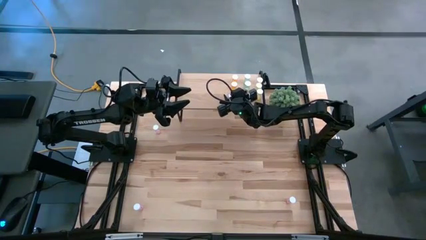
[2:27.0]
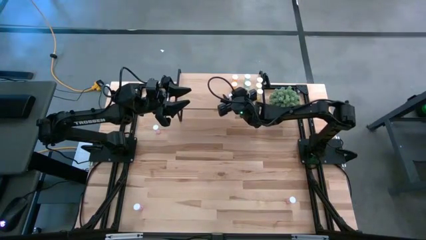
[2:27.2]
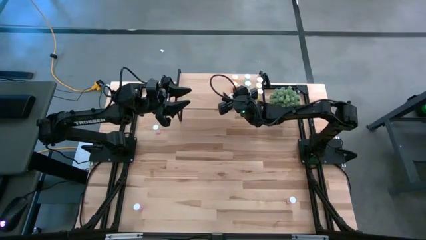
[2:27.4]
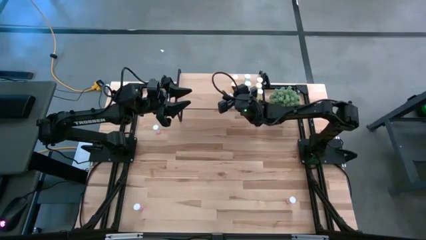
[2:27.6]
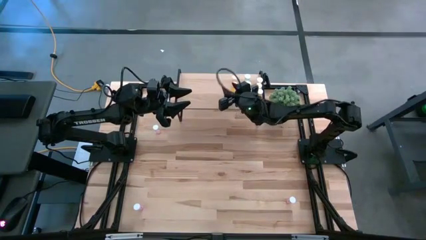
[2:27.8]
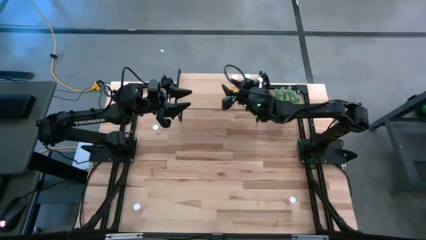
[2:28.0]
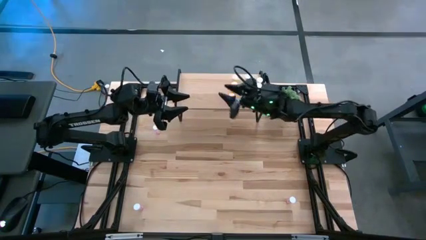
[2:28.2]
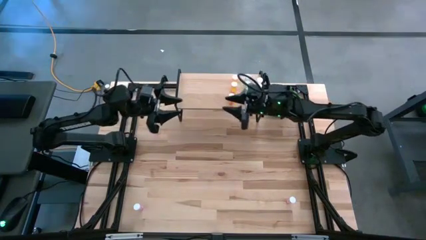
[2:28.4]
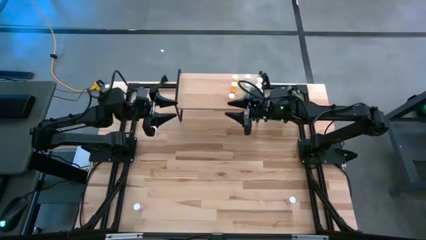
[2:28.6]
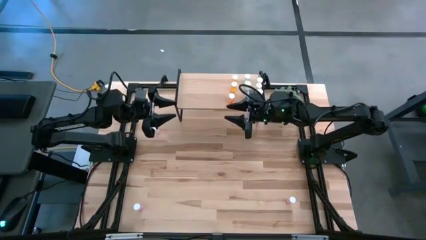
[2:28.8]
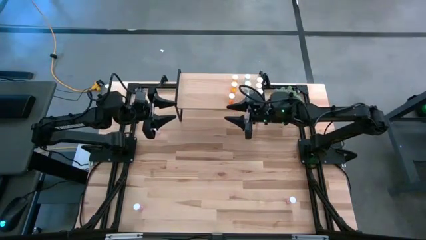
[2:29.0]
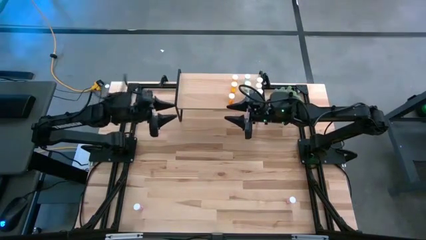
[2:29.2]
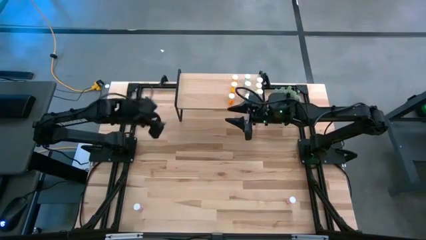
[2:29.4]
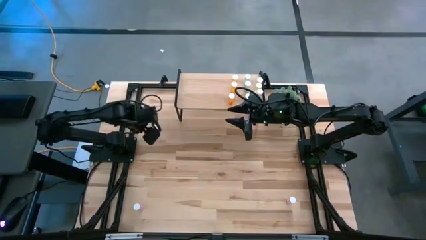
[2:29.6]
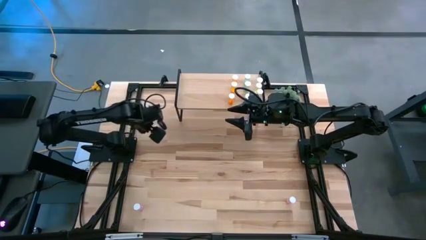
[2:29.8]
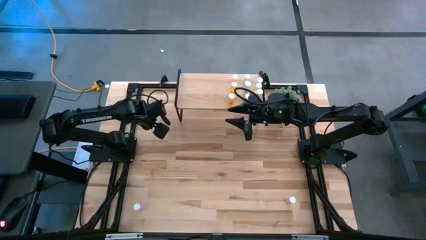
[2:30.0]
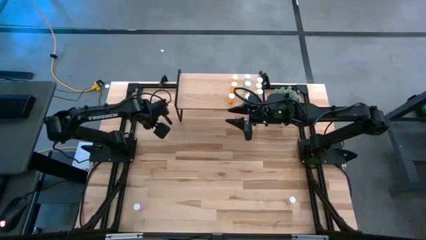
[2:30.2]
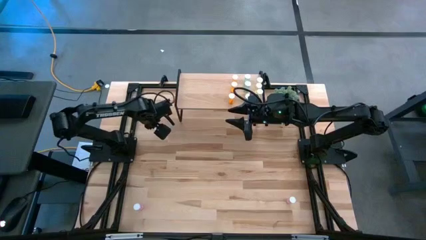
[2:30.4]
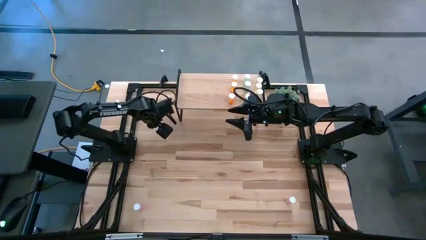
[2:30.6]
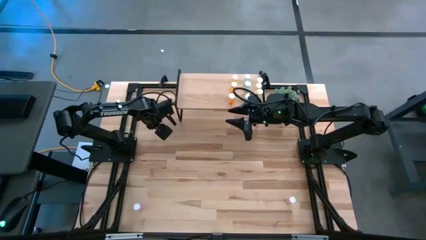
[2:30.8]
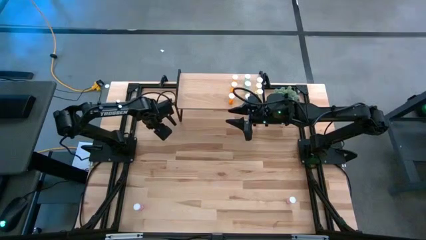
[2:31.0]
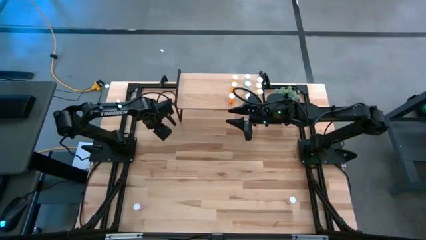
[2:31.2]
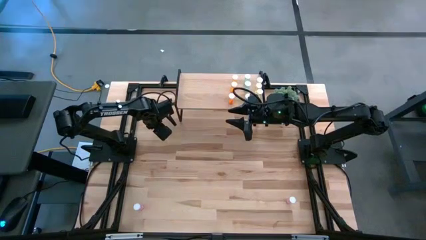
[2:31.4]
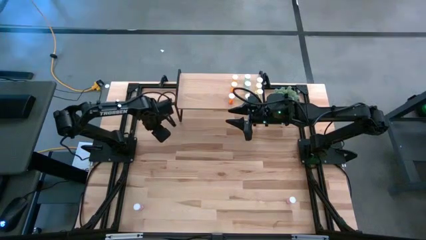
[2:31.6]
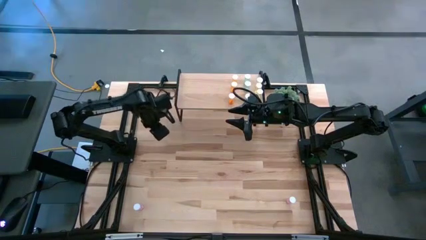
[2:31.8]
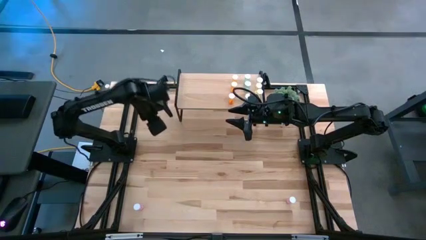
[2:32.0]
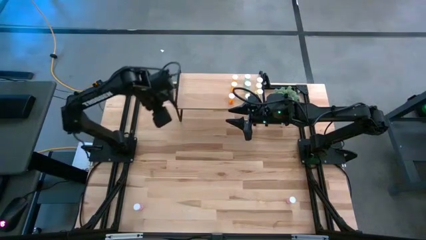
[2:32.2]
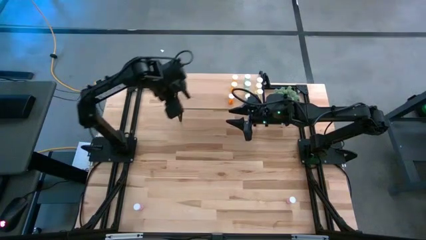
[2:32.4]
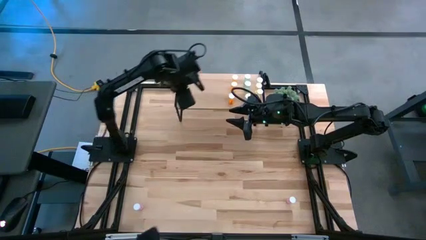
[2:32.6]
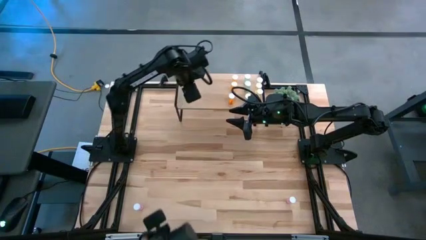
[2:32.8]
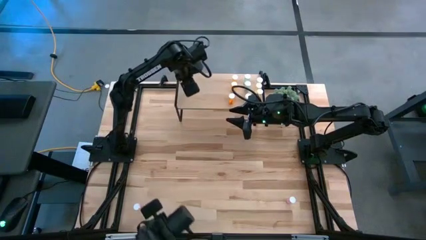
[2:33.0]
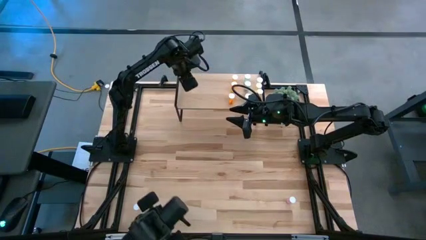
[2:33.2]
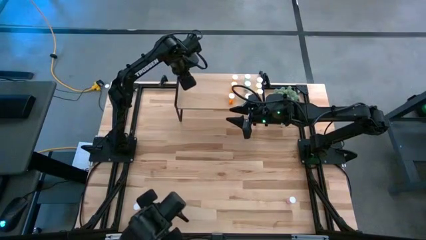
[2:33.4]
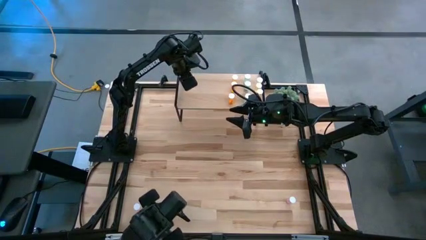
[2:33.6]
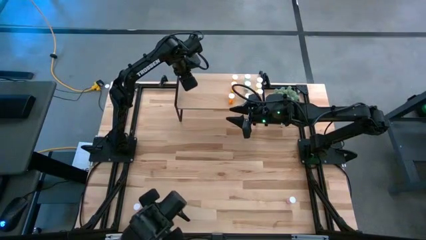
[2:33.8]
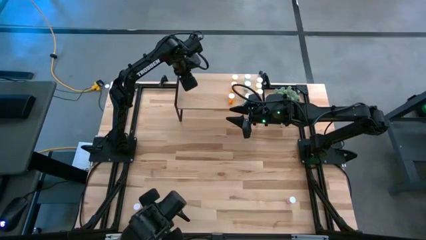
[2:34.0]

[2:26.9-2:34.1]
Task: Pick and place medicine bottles onto shelf by color
Put the top left pink pill bottle on the shelf

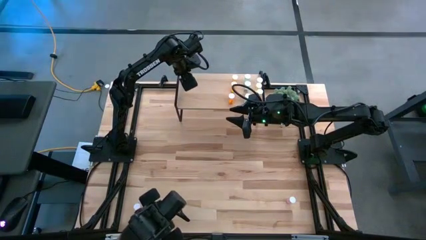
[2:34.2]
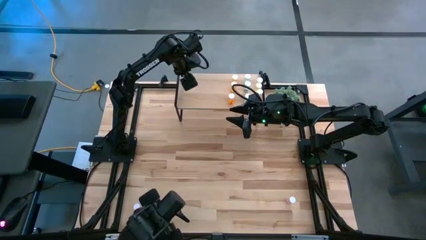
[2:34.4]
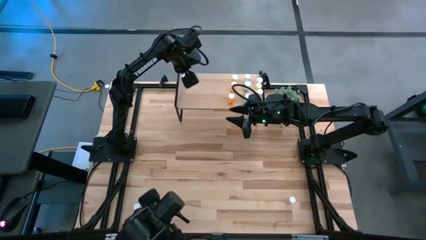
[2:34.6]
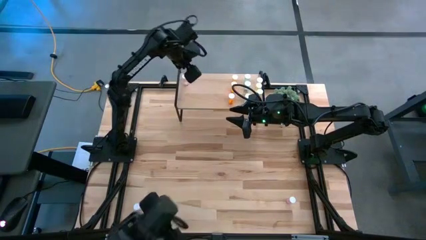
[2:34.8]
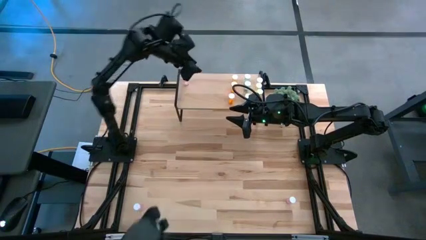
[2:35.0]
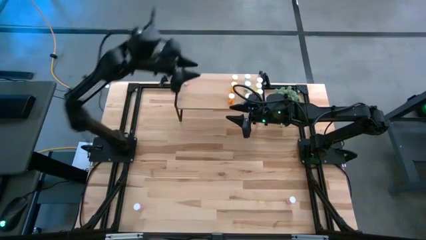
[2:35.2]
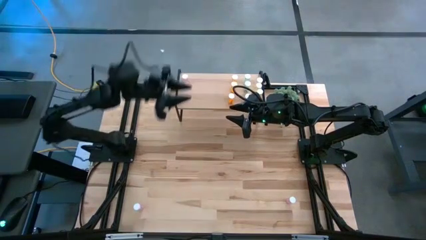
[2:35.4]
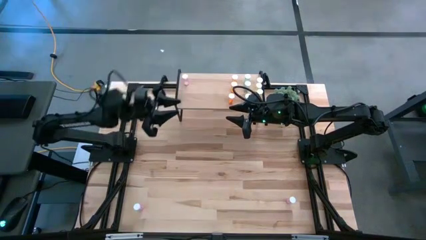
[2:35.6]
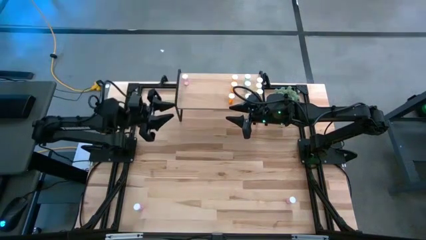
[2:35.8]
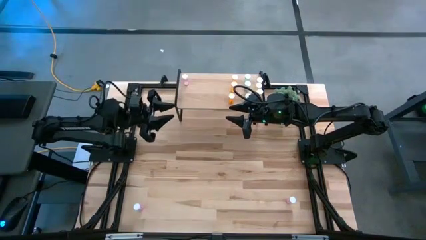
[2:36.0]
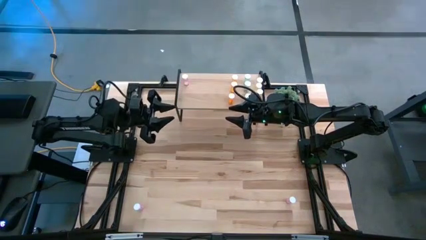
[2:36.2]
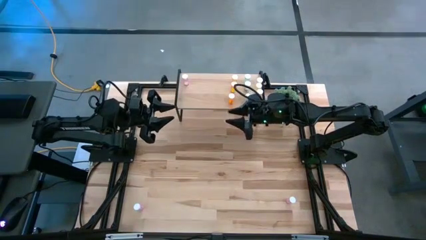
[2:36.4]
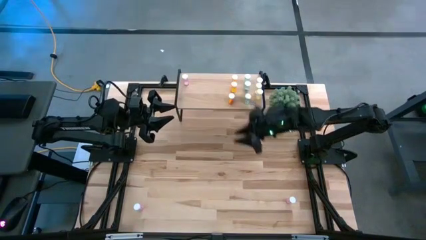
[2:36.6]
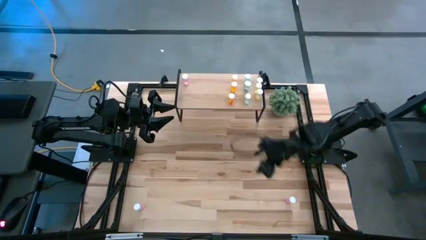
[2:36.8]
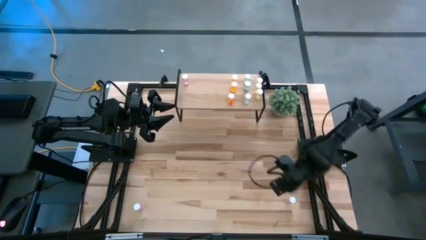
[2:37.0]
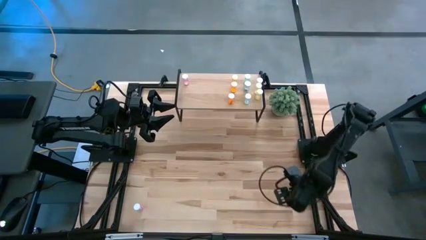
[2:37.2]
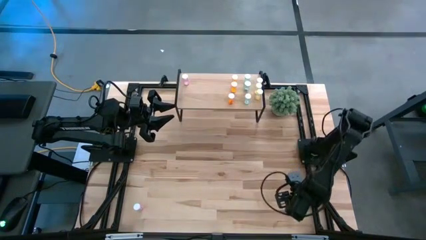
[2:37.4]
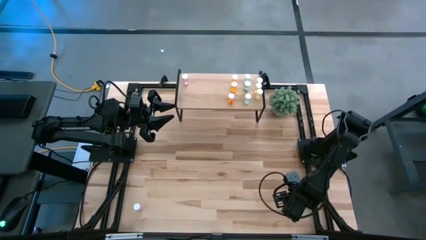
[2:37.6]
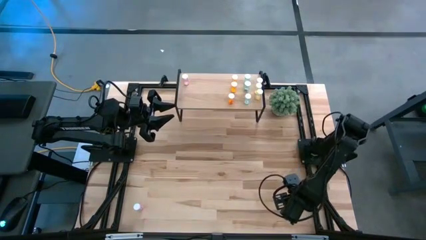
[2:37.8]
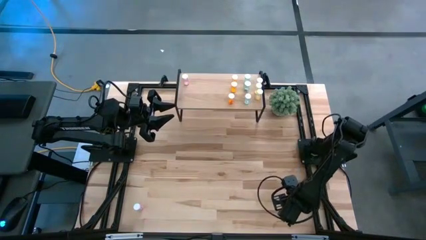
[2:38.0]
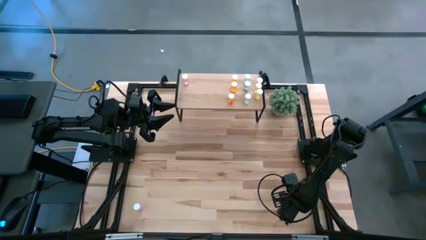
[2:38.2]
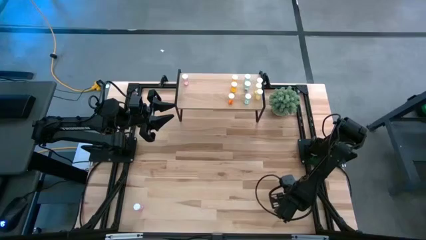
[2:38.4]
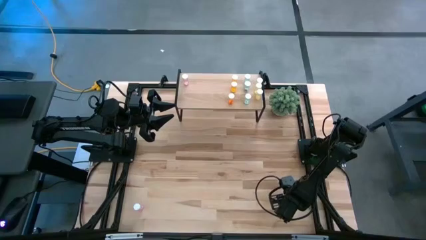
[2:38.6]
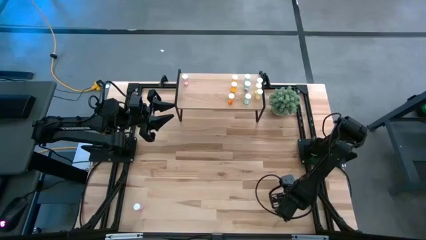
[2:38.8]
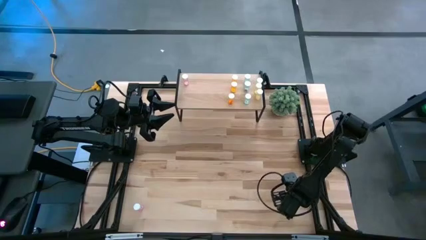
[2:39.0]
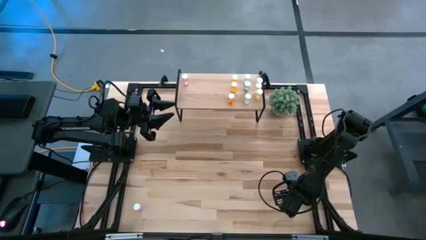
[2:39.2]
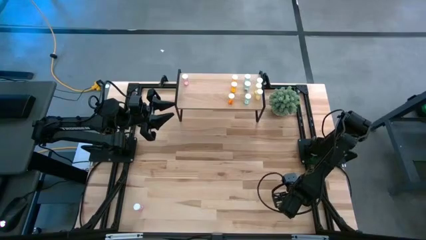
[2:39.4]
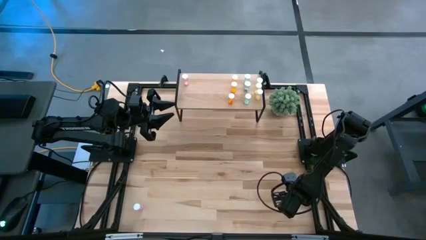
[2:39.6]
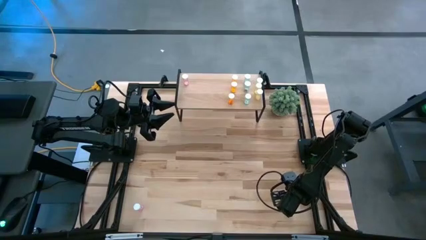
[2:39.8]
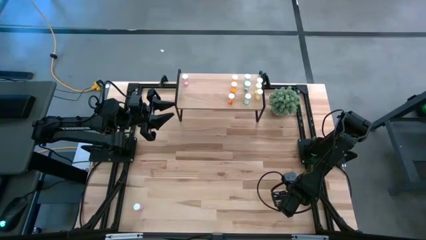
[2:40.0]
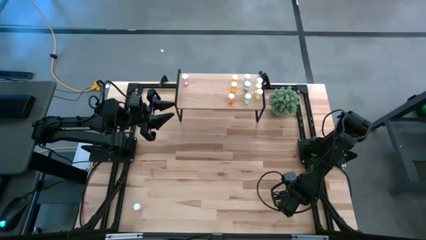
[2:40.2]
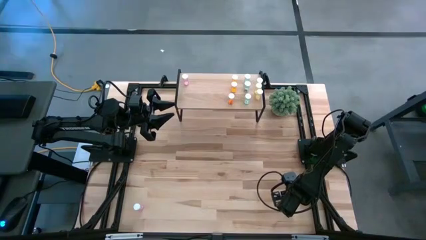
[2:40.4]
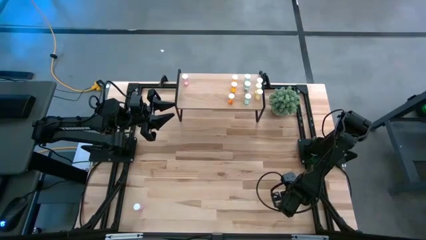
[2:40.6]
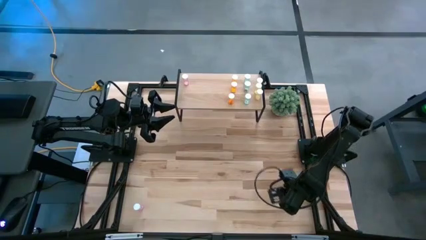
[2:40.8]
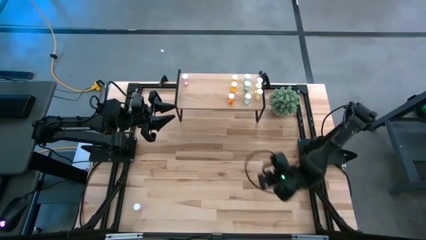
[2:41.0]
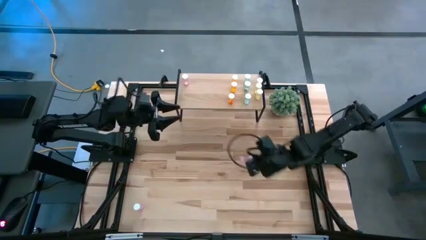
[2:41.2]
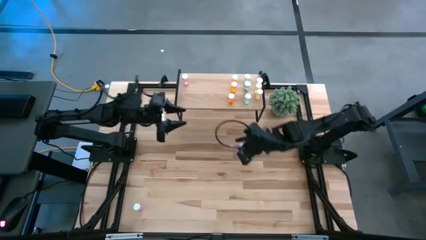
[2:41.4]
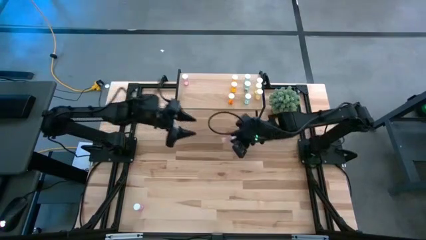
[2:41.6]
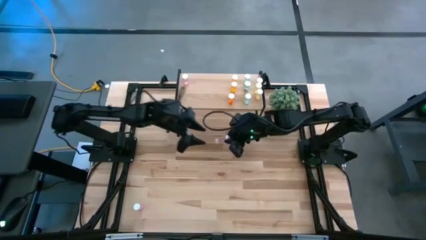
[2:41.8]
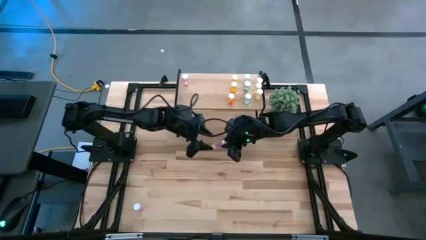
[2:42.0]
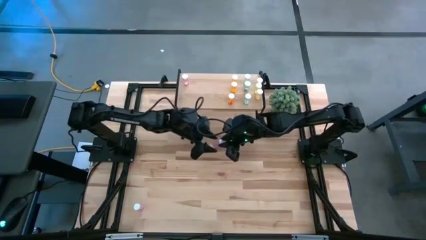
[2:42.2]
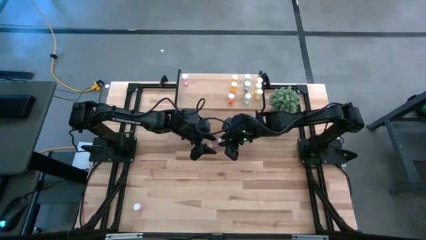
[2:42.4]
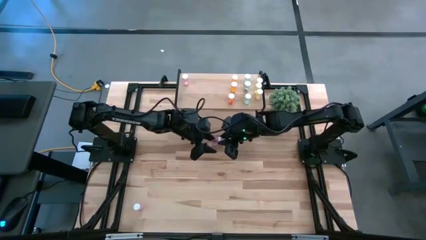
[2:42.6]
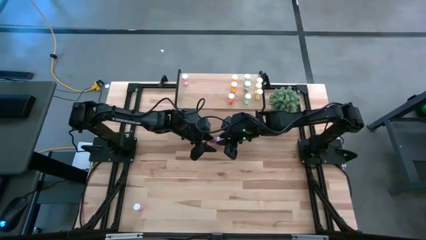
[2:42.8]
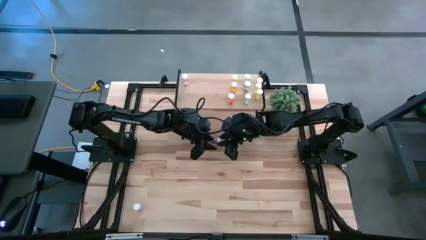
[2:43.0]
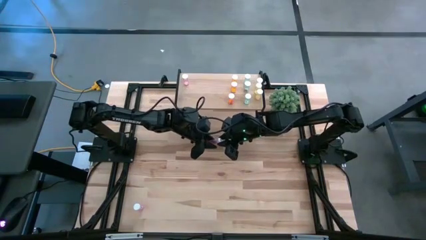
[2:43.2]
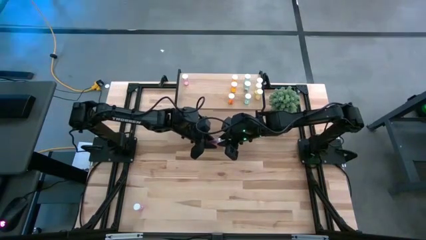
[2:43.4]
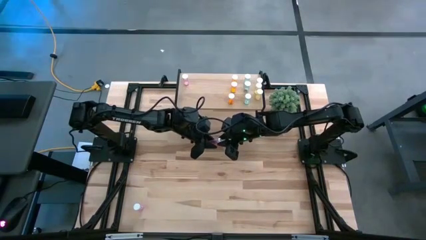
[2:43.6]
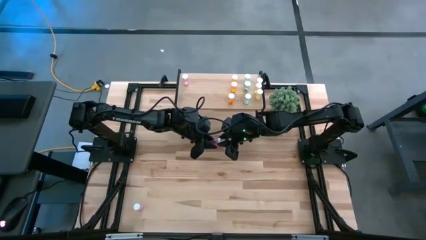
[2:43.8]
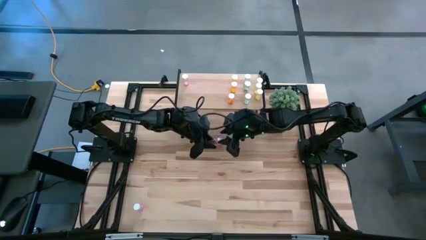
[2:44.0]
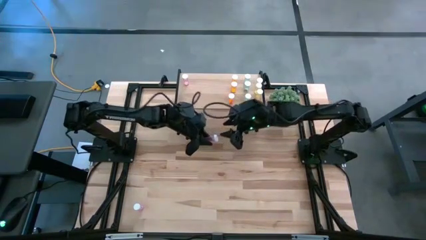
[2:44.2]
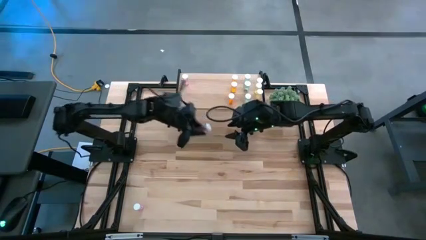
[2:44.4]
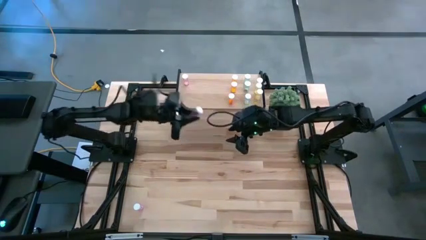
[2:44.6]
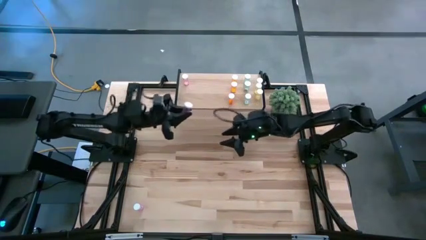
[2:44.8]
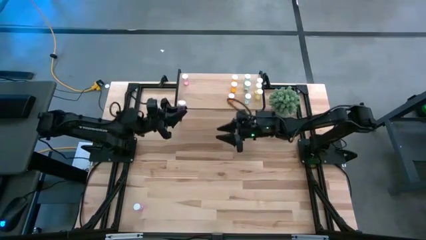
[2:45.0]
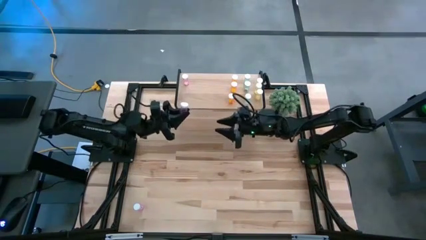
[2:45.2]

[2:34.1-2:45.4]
Put the right pink pill bottle onto the shelf aligned with the other pink pill bottle
